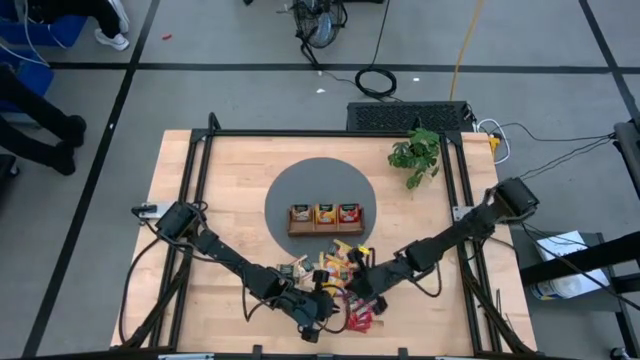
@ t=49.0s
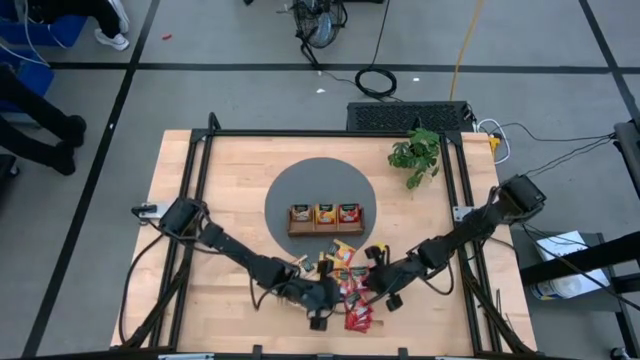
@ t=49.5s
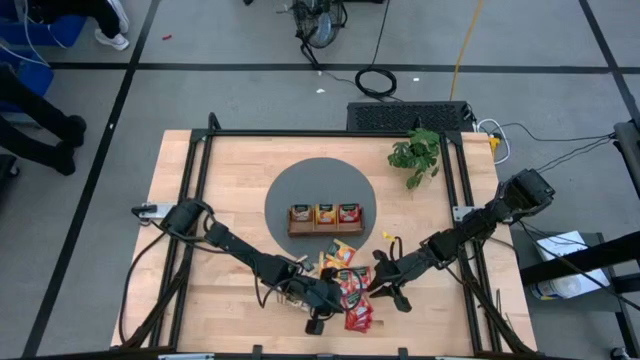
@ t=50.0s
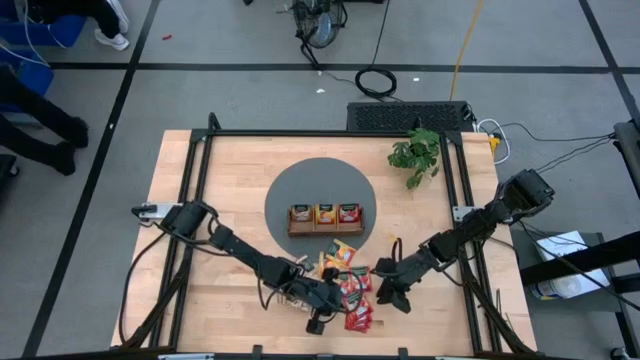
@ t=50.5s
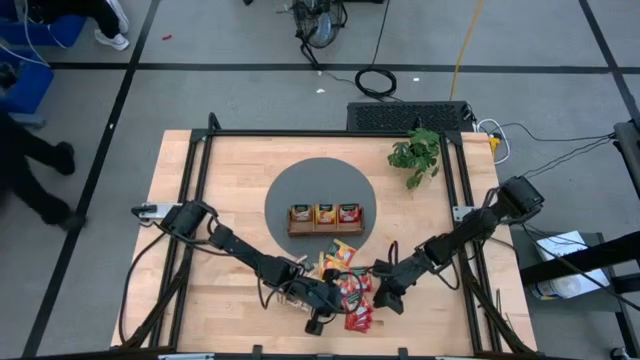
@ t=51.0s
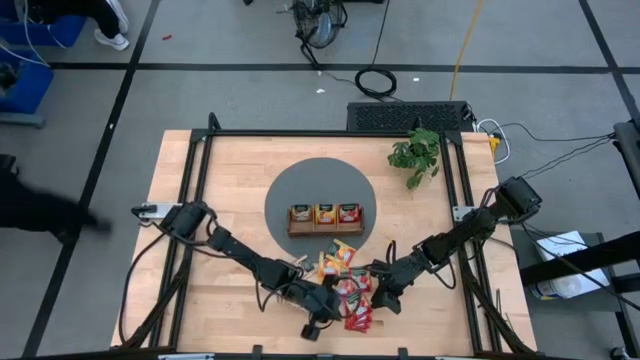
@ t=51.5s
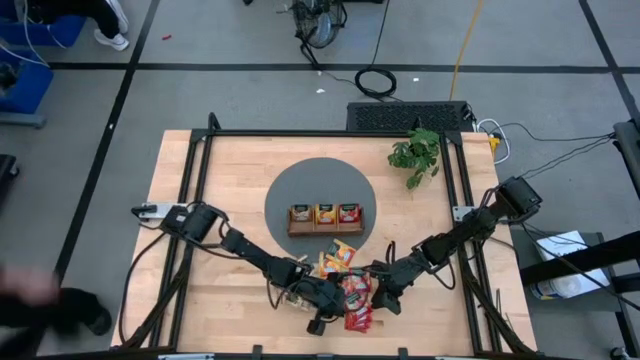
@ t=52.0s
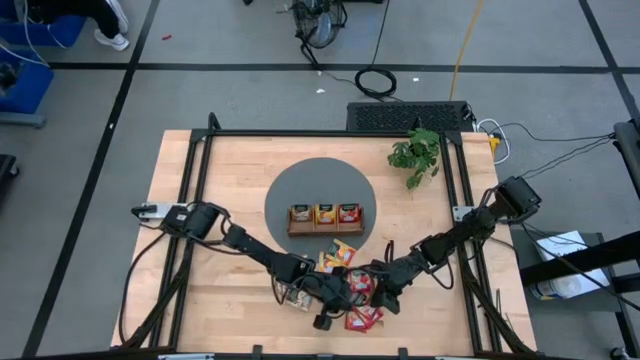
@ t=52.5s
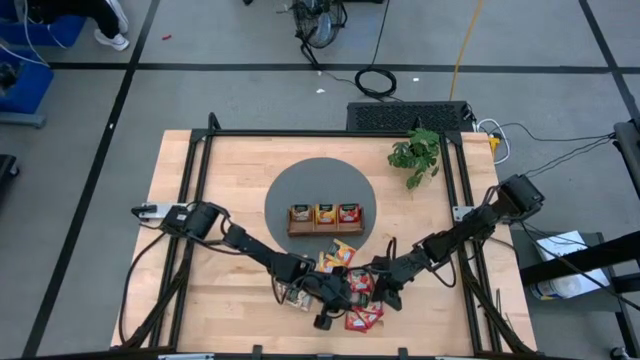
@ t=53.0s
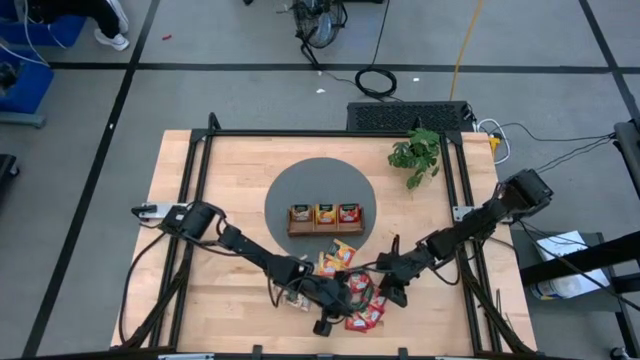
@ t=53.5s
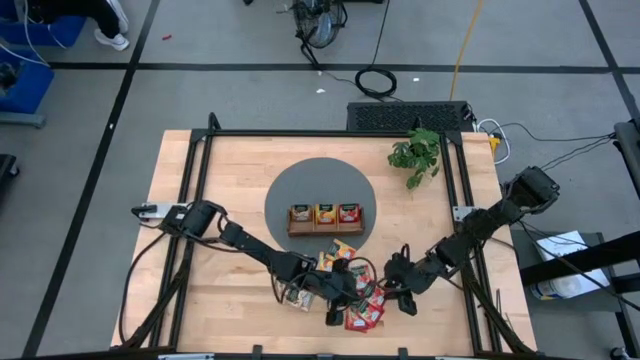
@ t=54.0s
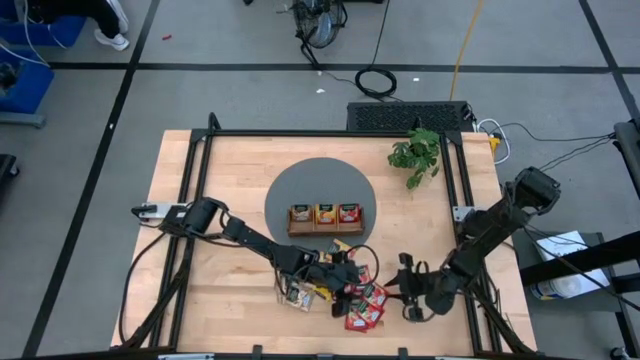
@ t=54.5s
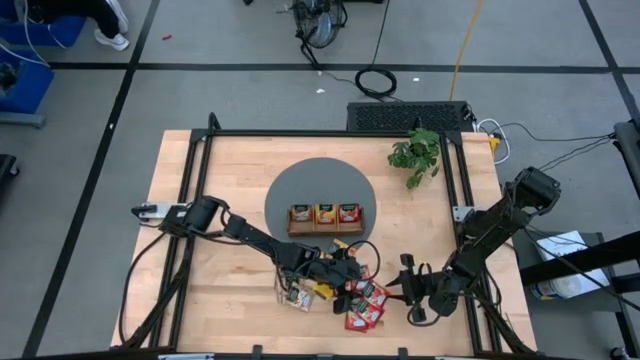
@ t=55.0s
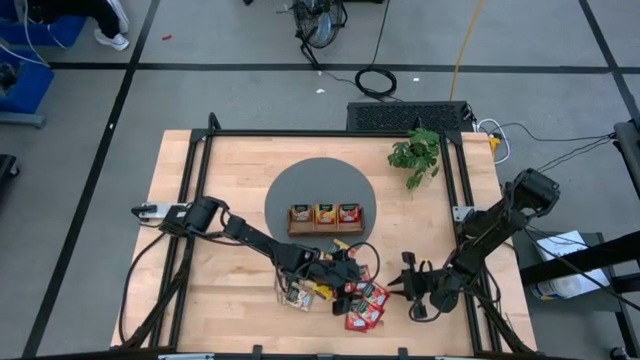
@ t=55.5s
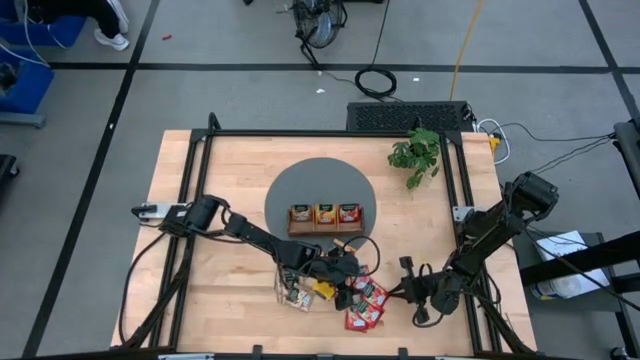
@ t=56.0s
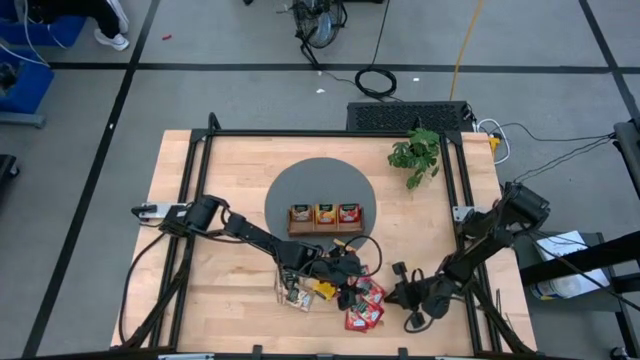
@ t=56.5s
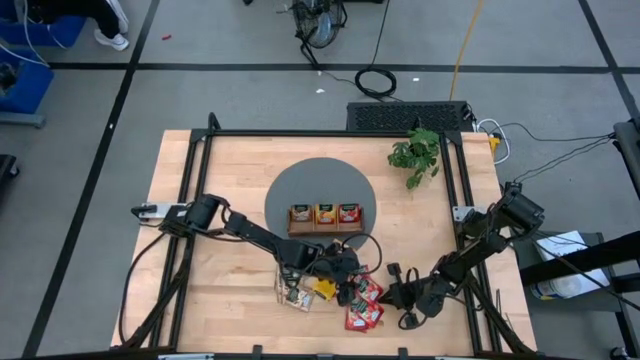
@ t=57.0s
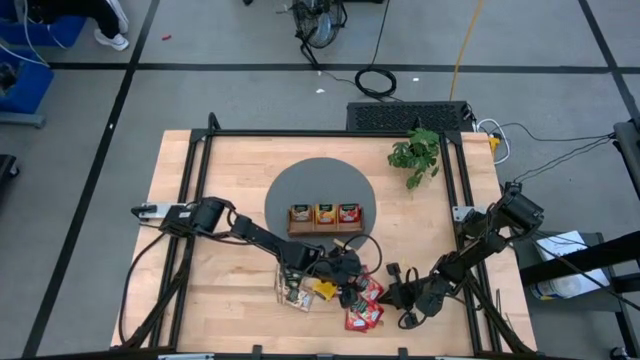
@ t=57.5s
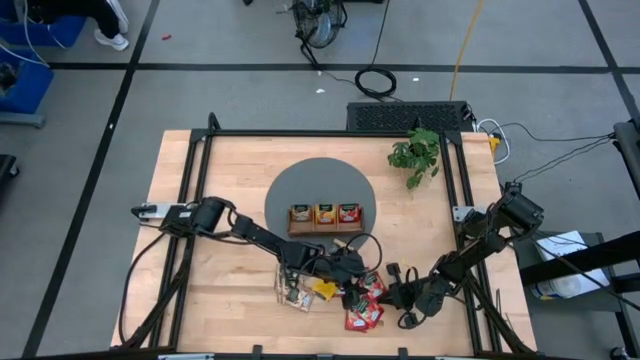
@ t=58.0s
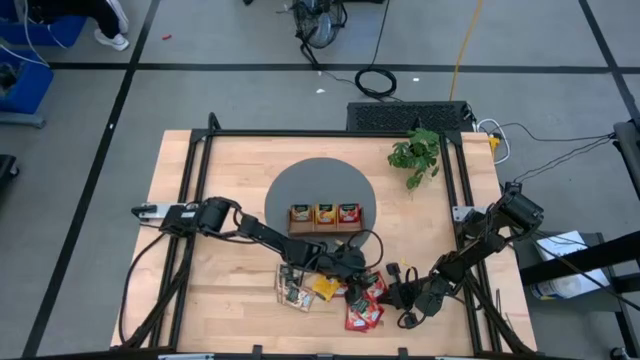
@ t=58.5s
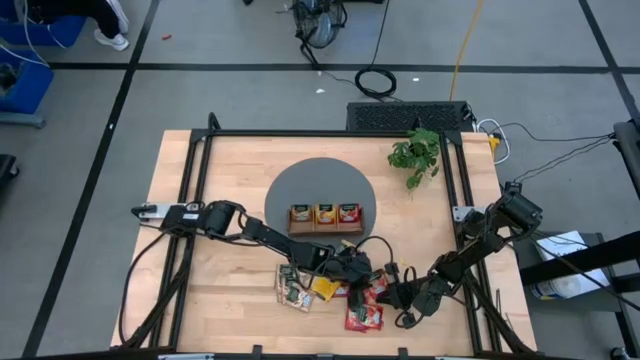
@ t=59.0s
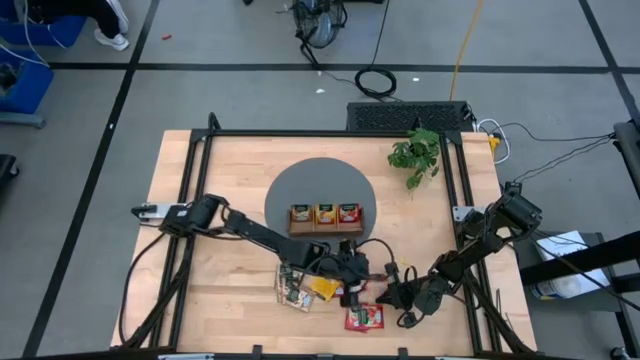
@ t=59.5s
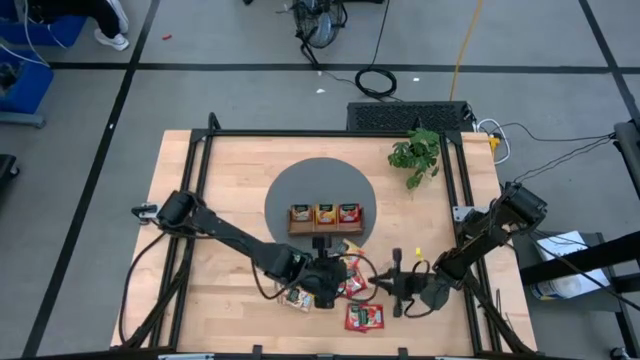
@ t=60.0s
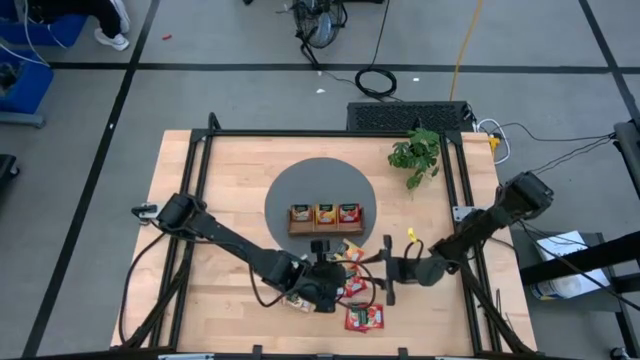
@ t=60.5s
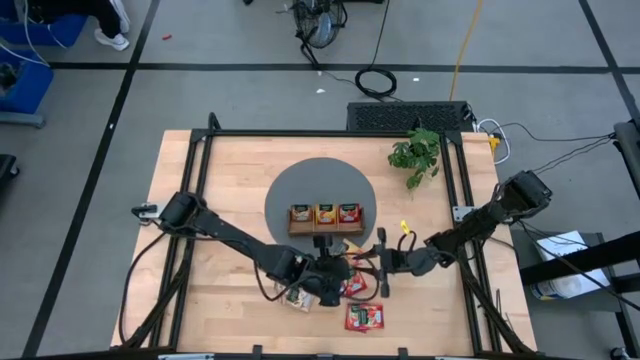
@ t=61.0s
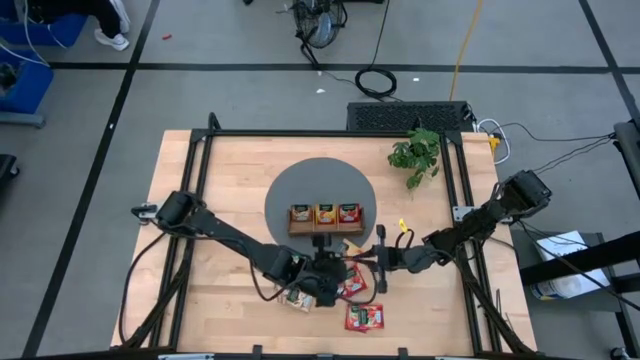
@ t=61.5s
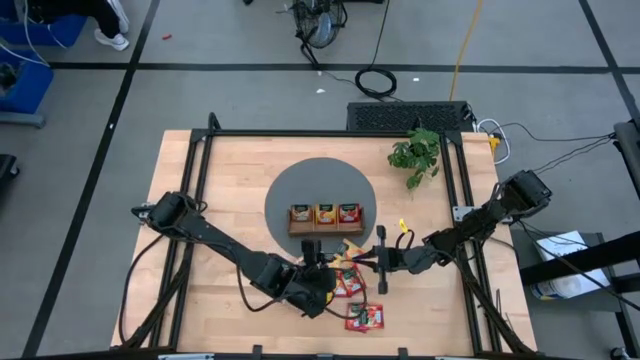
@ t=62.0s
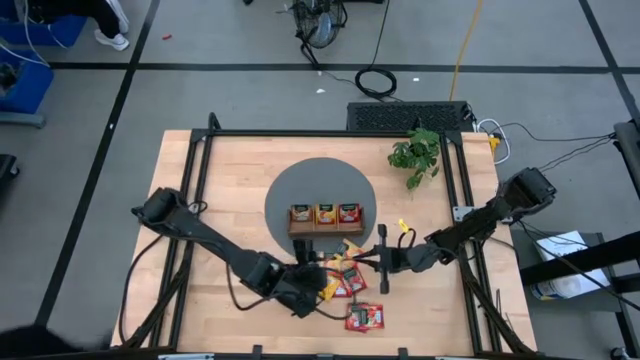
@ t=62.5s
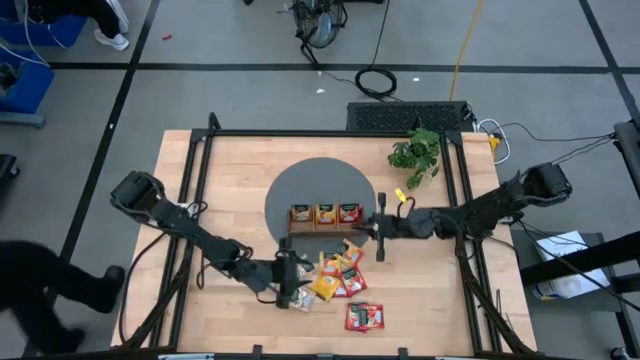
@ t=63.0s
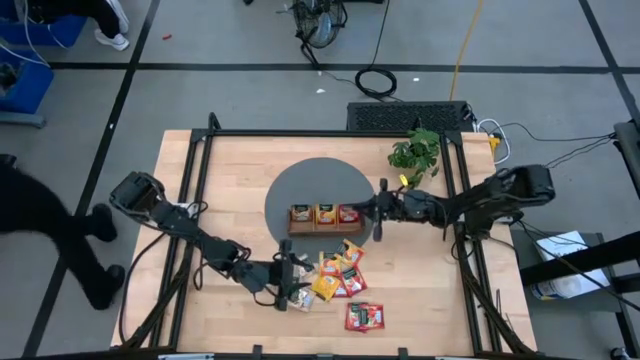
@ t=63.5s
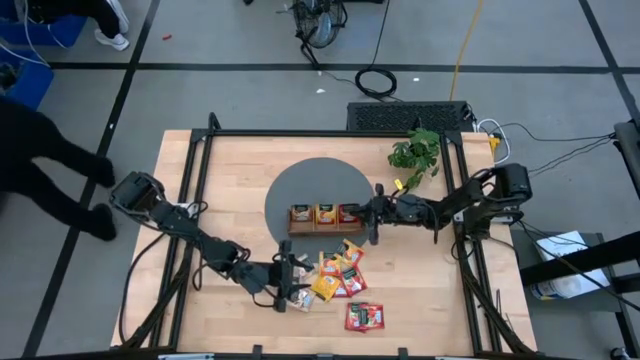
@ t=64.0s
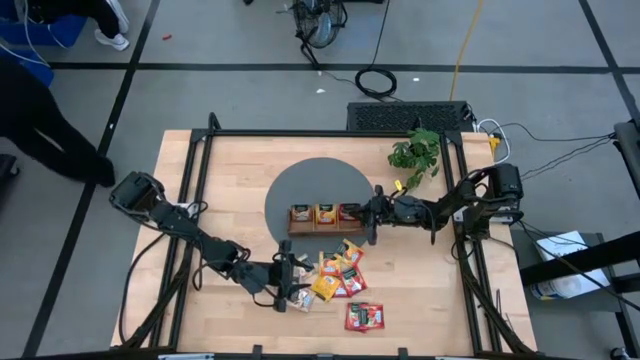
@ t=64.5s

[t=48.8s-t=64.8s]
Task: Pick & Place Tea
Put the red tea bag into the right slot of the wooden organizer

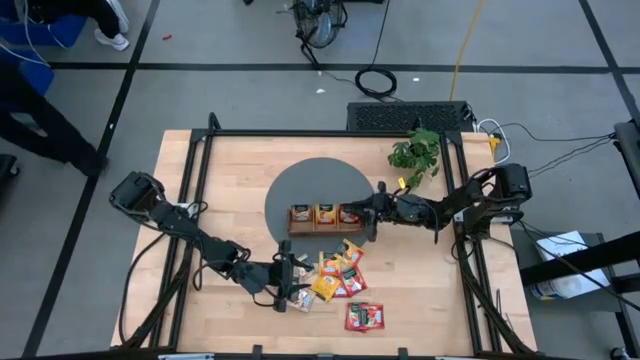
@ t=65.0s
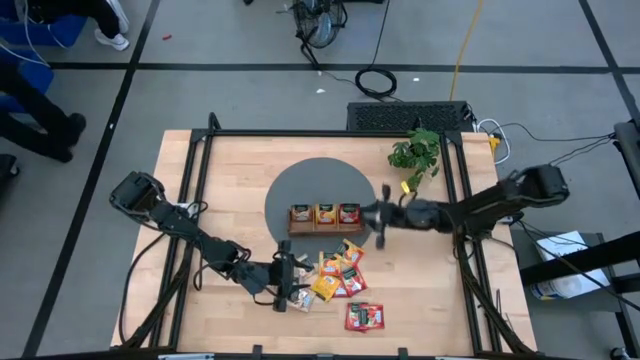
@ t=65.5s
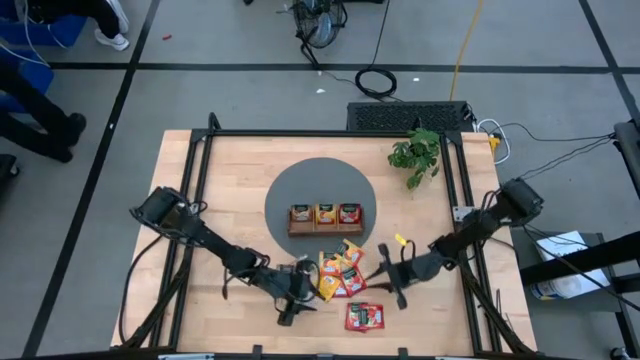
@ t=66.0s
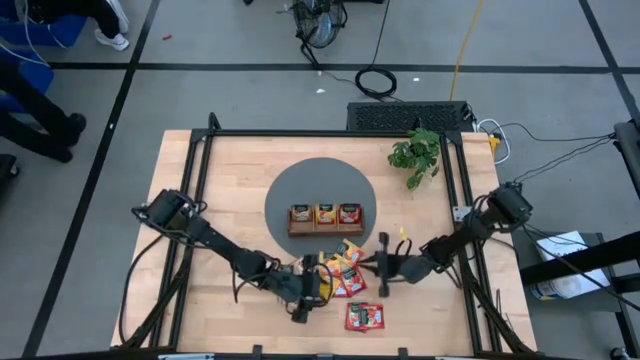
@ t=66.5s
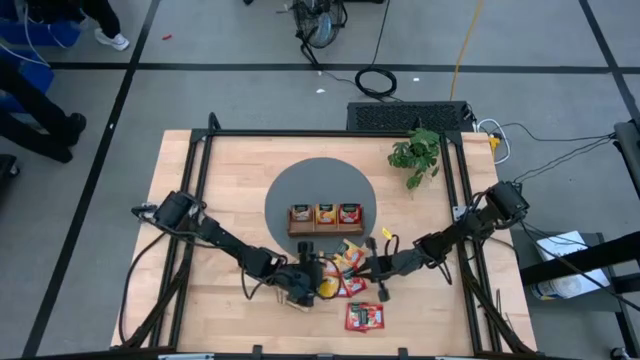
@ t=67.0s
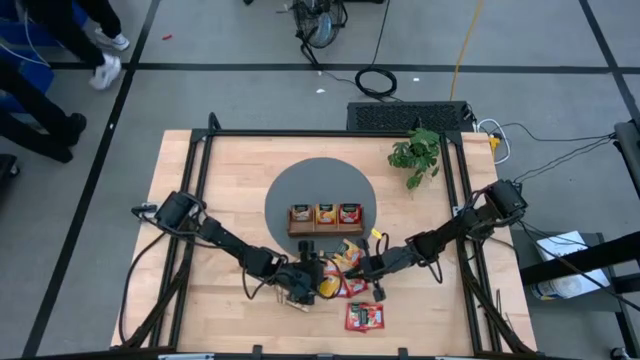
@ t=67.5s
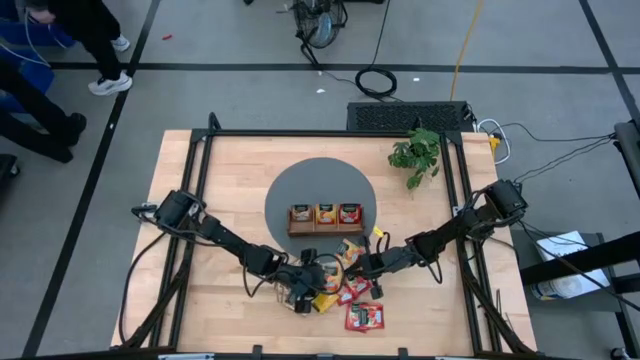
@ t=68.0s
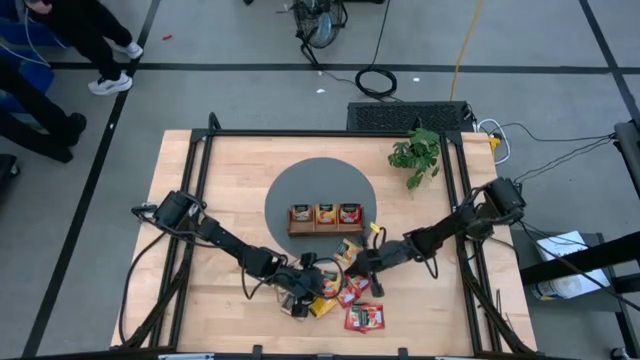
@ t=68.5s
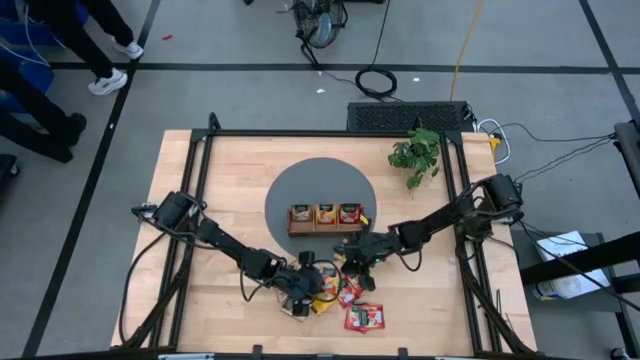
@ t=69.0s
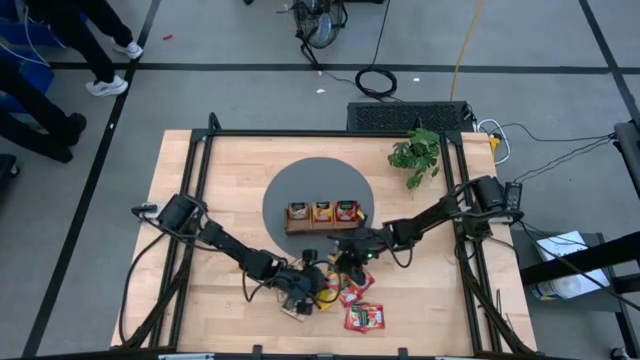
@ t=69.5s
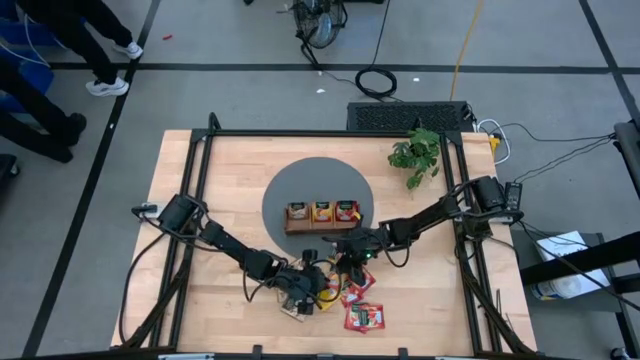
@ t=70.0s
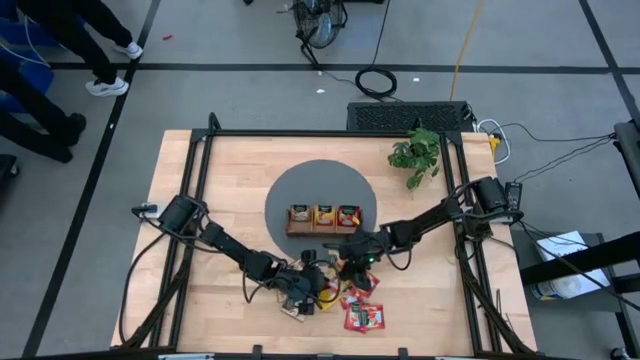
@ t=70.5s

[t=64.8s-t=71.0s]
Put the orange tea bag into the middle slot of the wooden organizer
